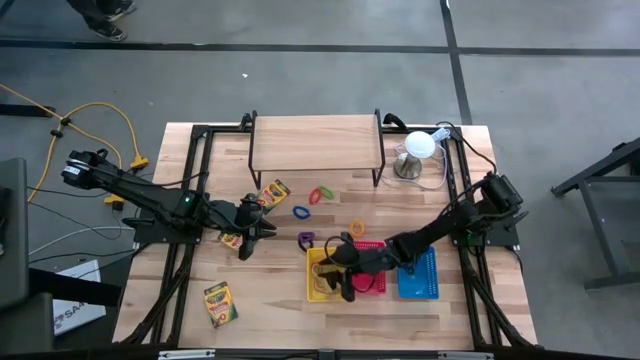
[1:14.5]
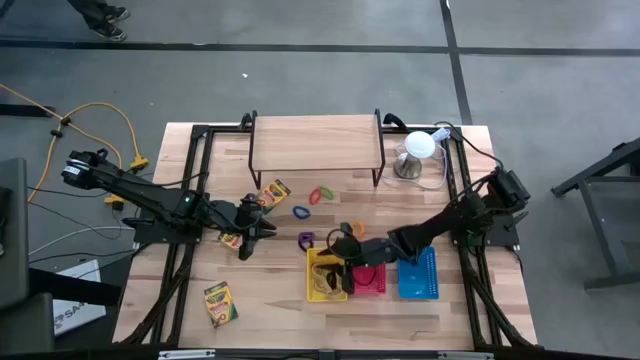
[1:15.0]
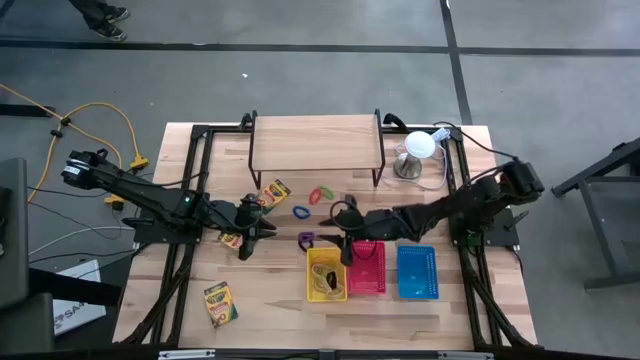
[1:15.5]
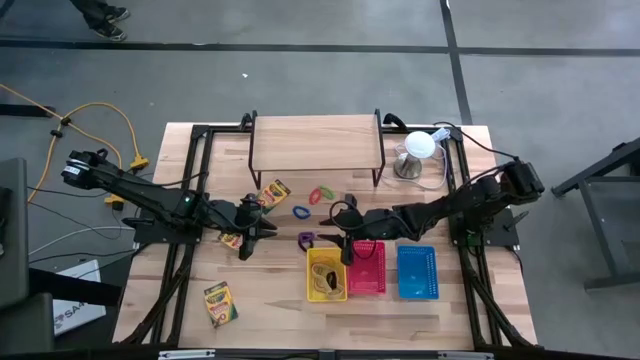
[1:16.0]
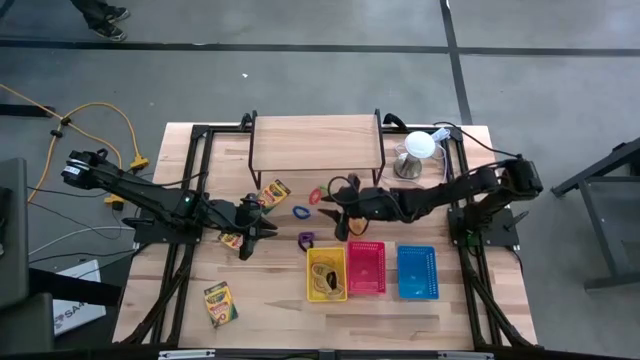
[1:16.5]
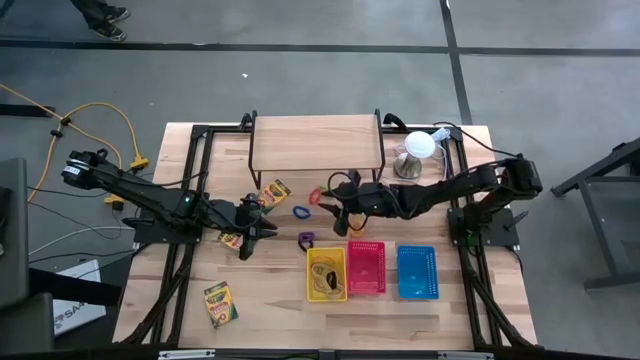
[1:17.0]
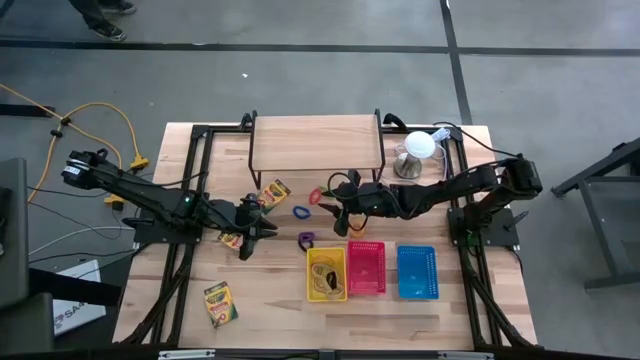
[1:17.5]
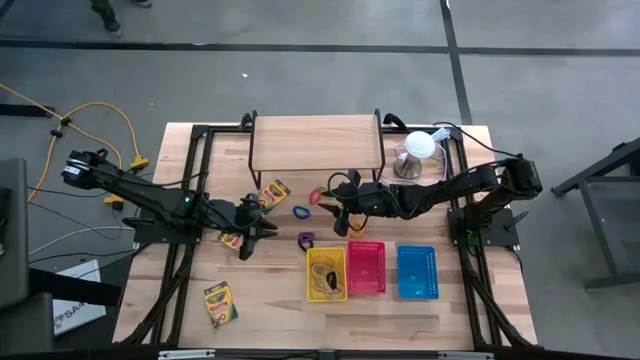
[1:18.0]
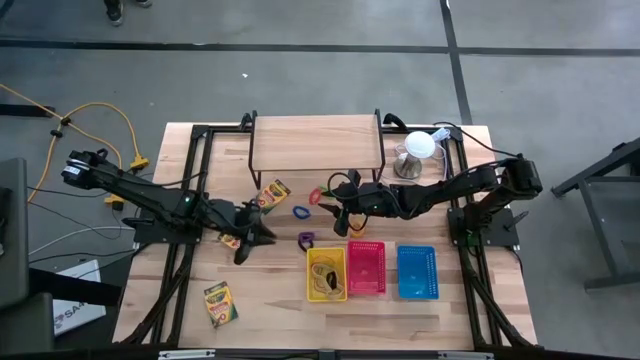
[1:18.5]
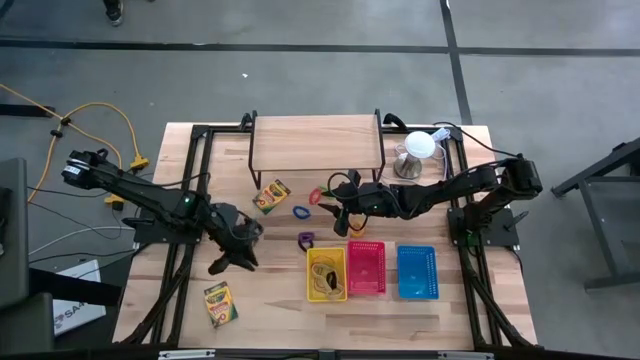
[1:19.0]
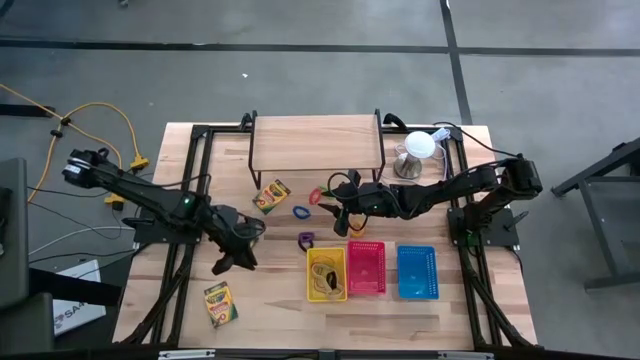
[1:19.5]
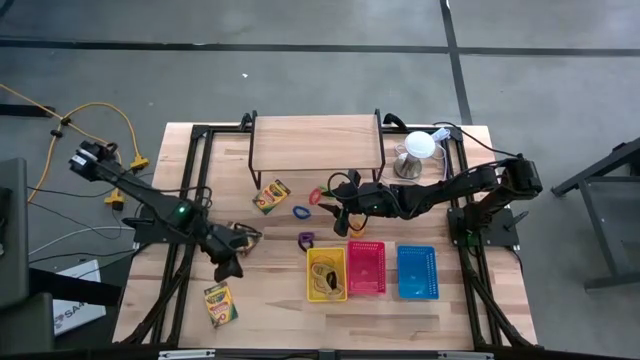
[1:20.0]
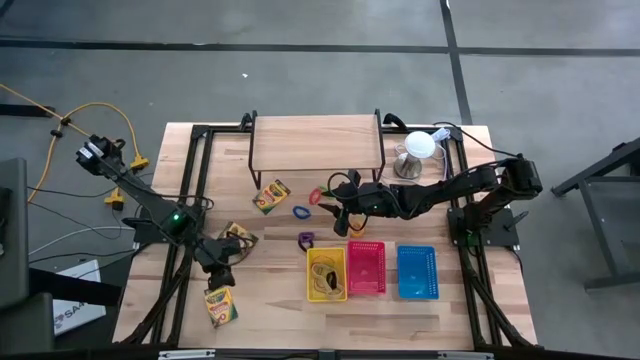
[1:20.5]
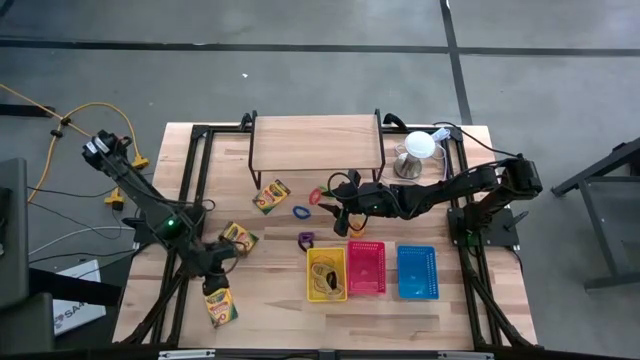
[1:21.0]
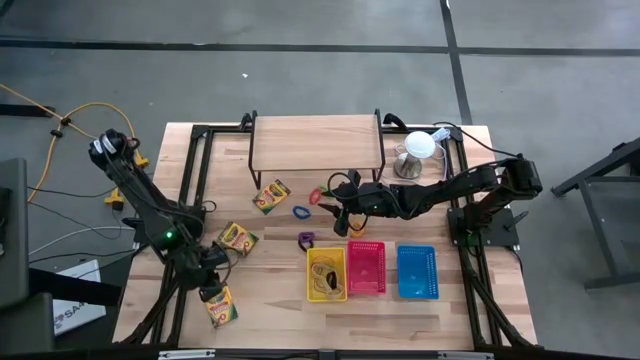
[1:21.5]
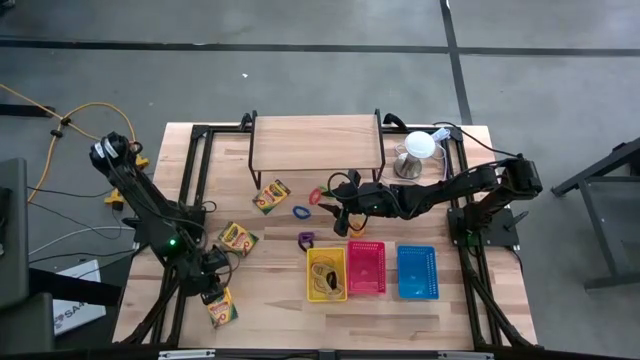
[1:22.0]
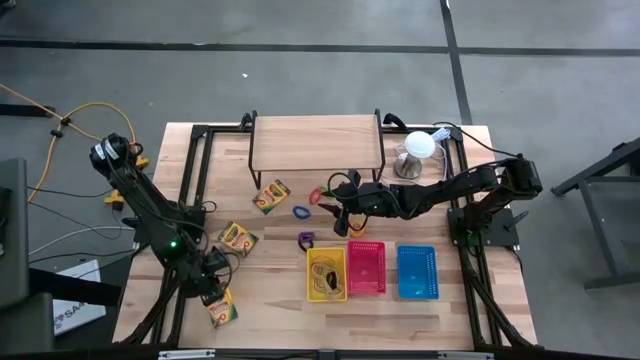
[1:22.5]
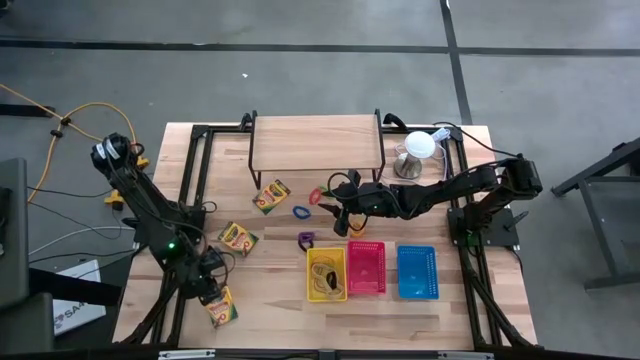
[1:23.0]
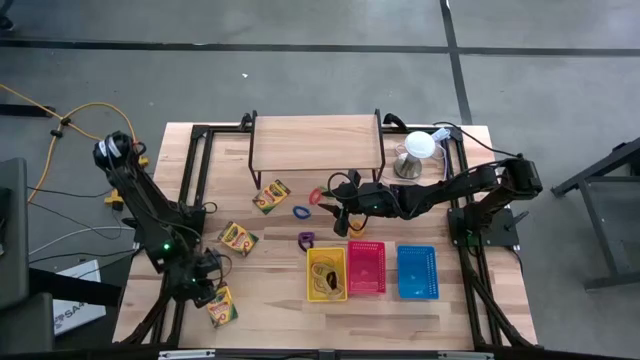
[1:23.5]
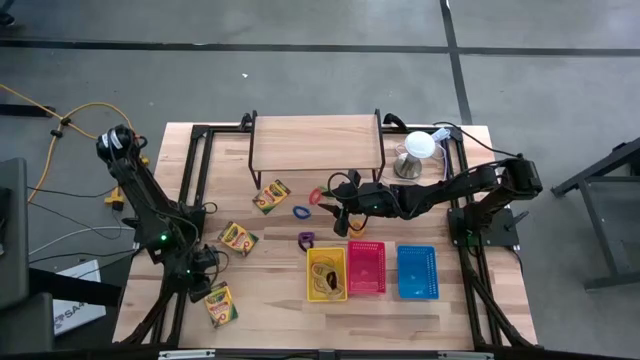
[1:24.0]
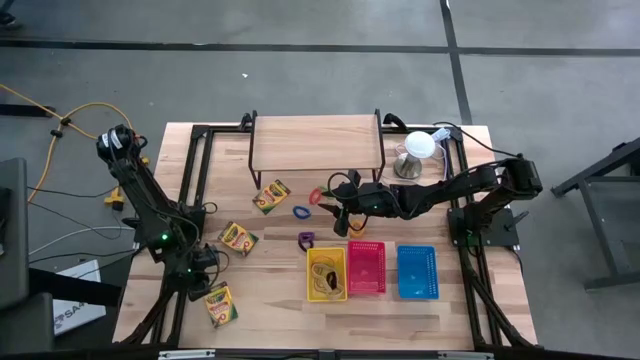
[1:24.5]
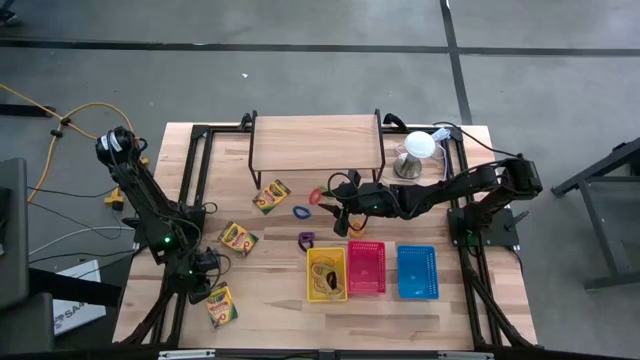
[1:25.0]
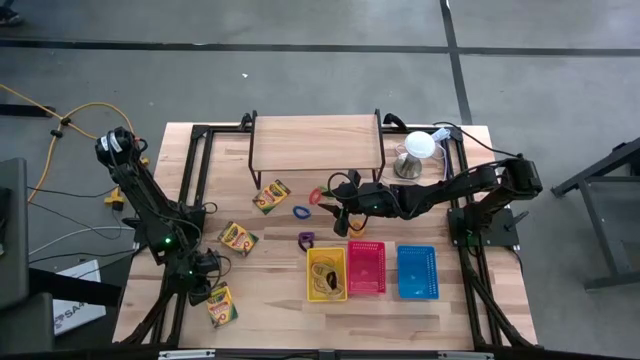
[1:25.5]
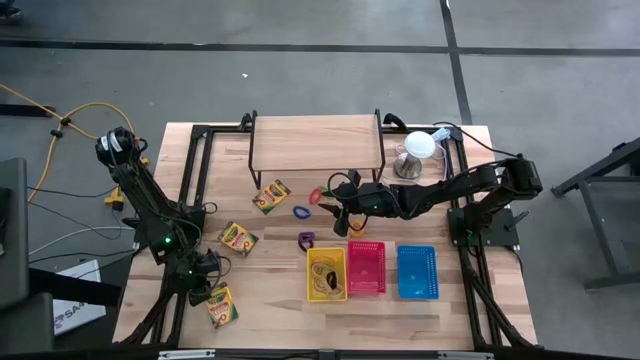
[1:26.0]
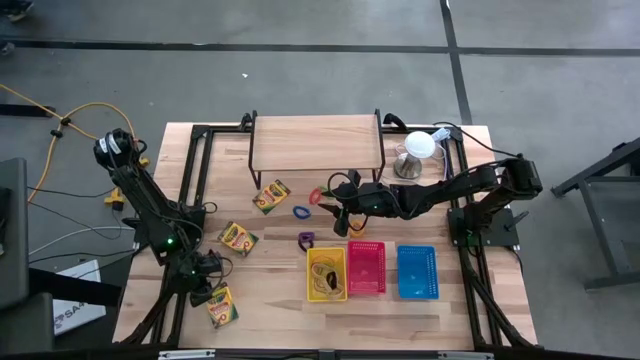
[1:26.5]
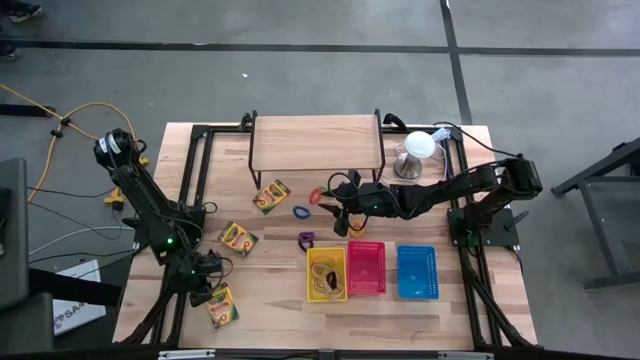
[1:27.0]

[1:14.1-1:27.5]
Task: Pick & Place Office Desk Supplies
Put the bottom crayon box into the red bin

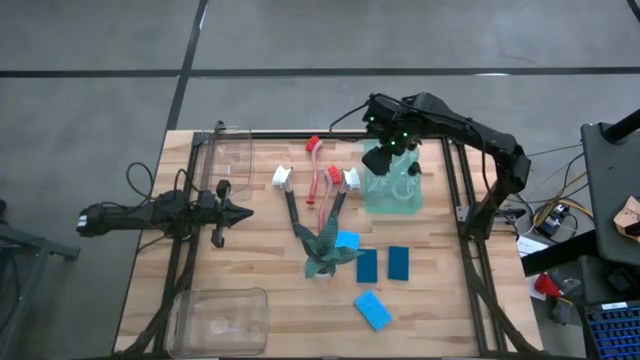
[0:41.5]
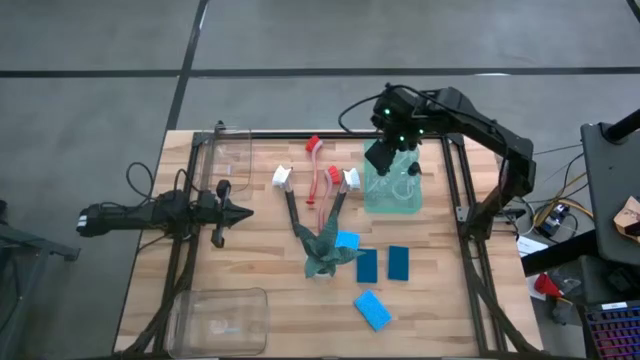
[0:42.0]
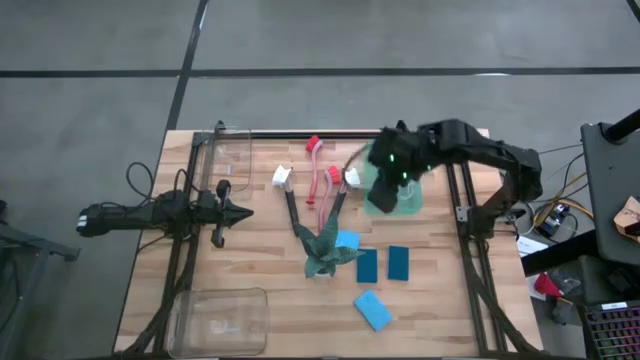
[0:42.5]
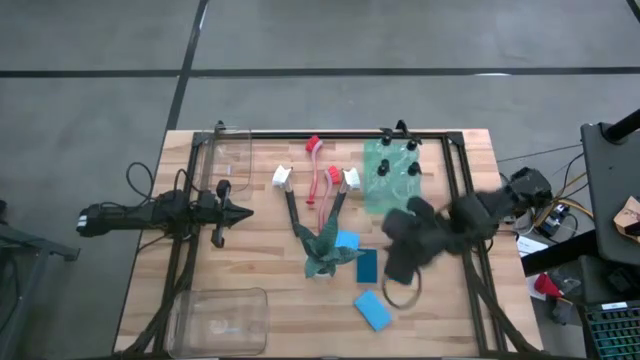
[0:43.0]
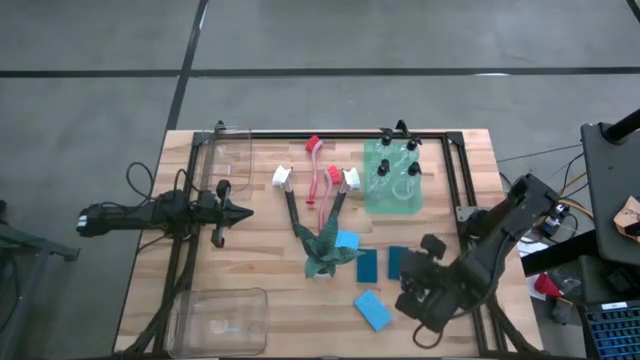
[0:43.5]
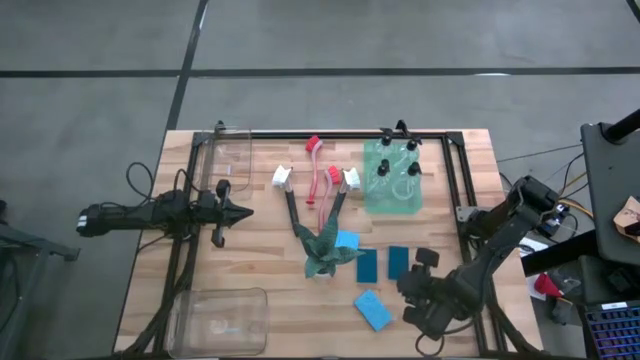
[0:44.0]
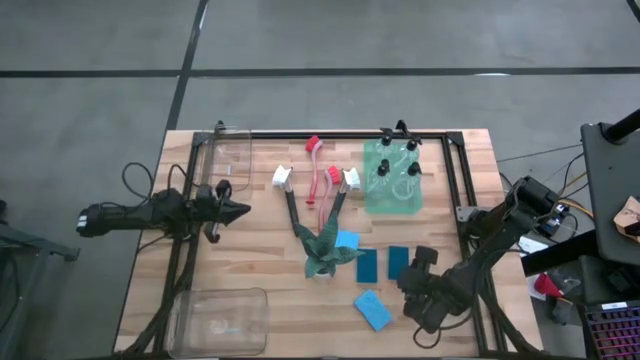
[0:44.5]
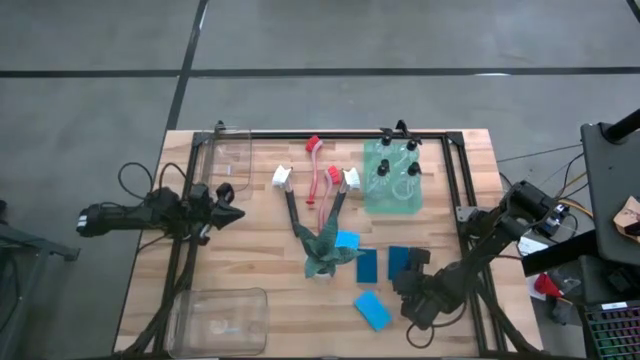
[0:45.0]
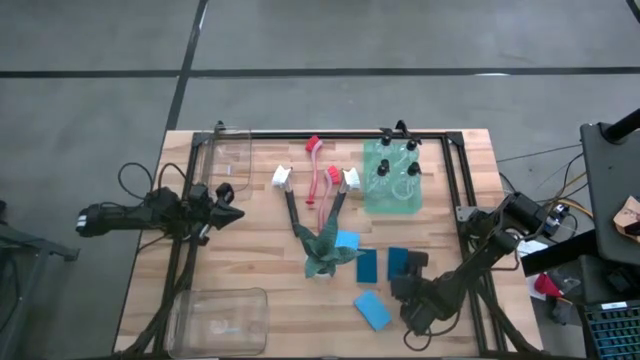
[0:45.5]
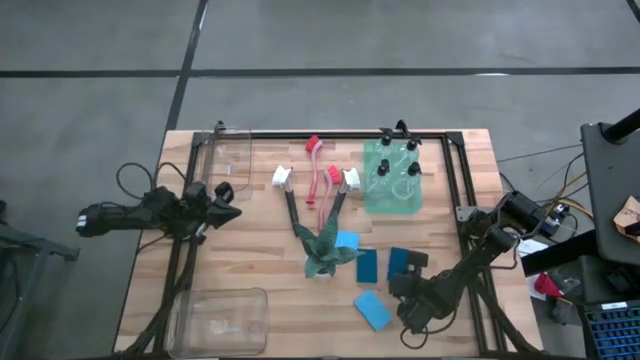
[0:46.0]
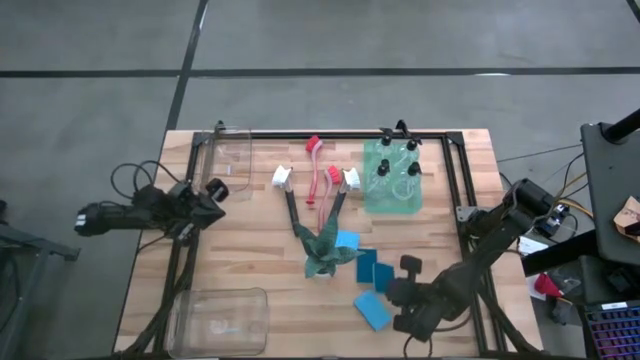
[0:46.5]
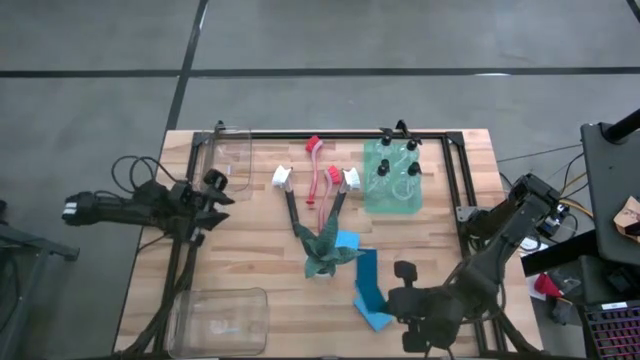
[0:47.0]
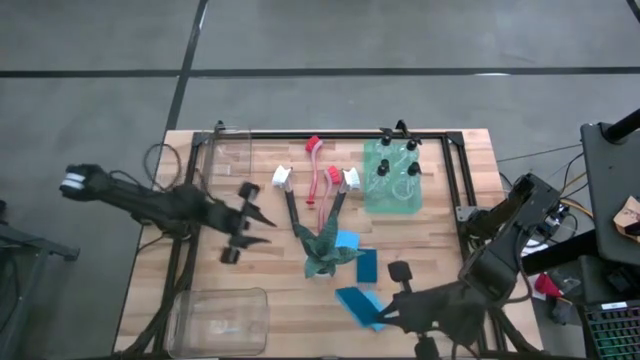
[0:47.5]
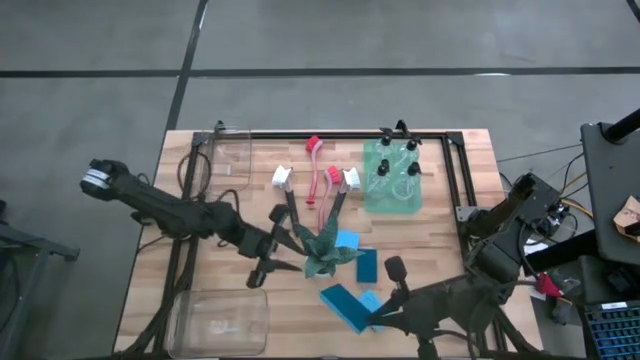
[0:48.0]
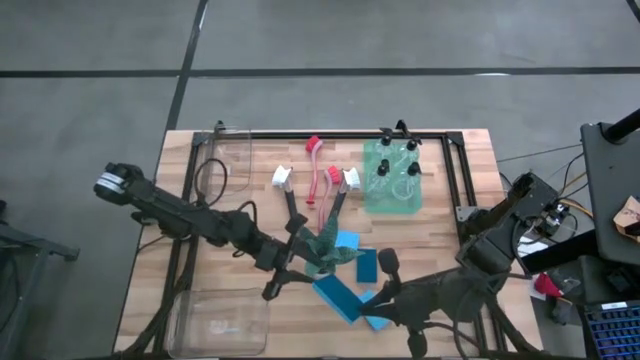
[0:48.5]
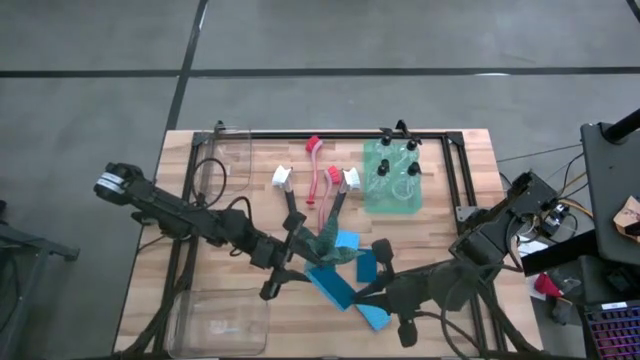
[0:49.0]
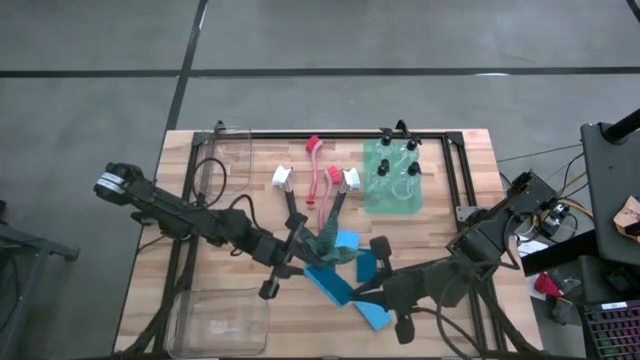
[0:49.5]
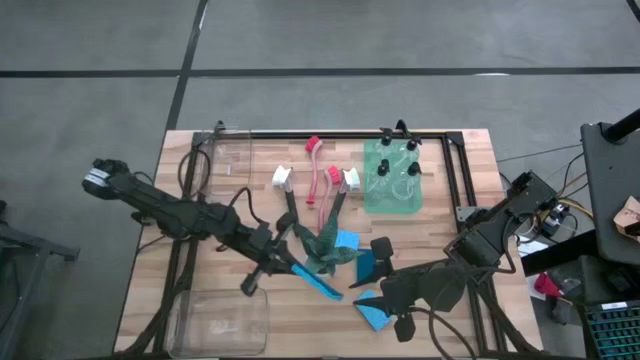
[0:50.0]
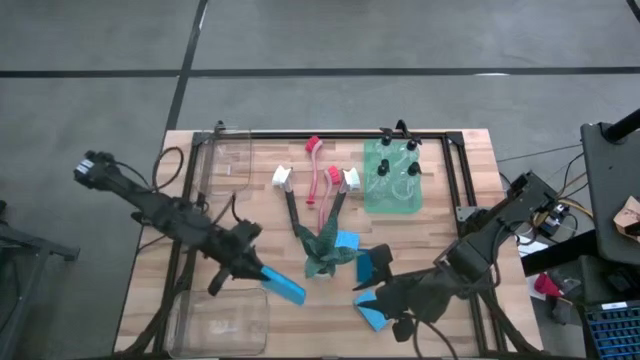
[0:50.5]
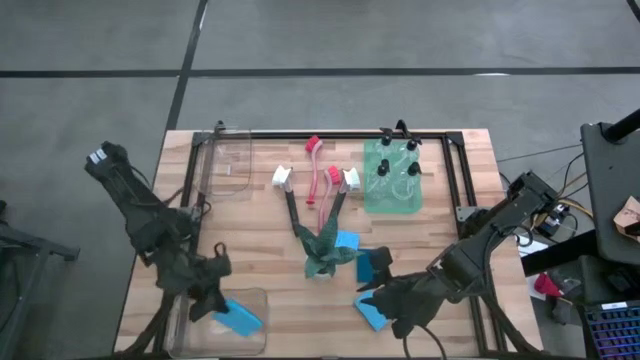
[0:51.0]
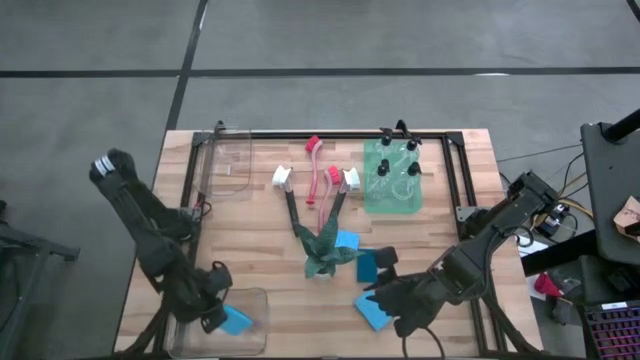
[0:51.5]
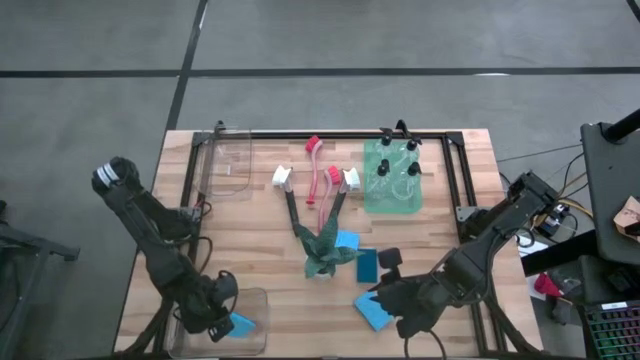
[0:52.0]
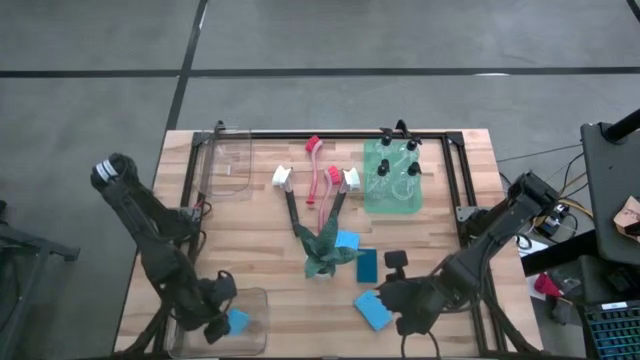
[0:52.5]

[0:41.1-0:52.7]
Task: Pick & Place Kitchen Sink Supplies
Put the blue sponge into the bottom transparent bin
